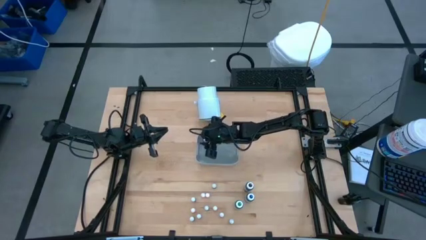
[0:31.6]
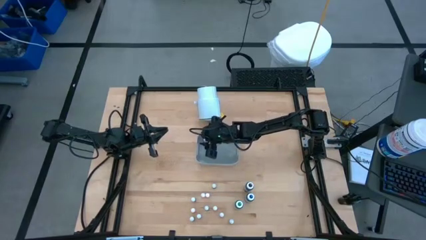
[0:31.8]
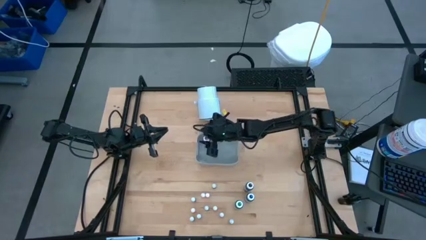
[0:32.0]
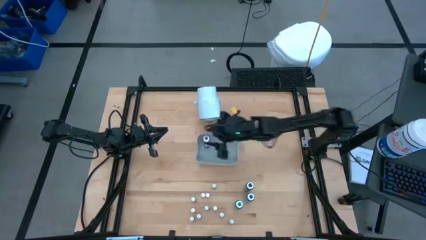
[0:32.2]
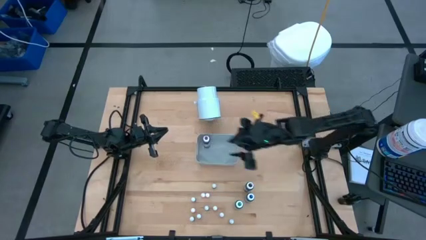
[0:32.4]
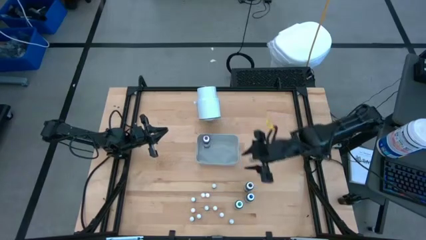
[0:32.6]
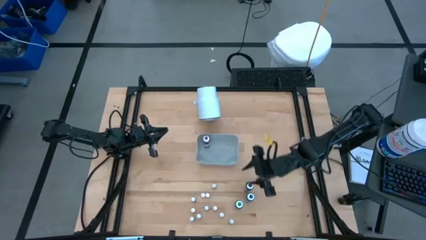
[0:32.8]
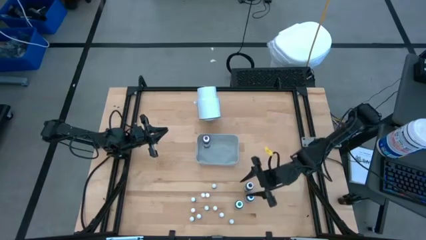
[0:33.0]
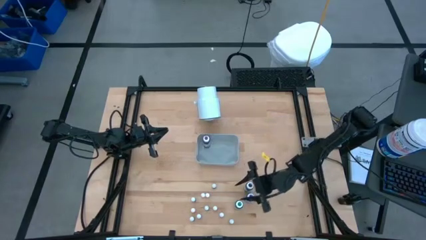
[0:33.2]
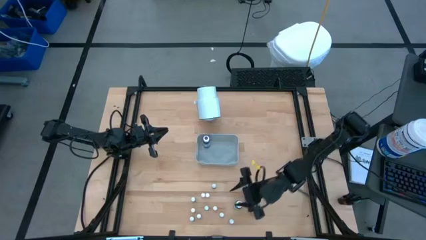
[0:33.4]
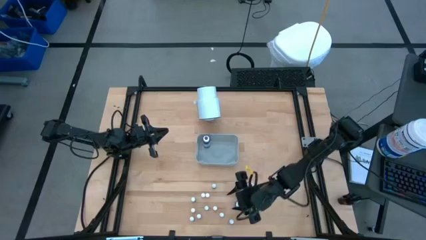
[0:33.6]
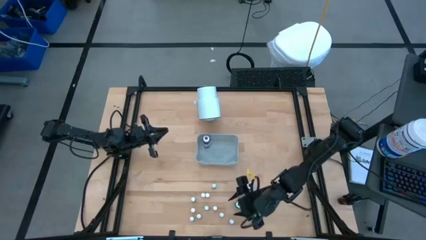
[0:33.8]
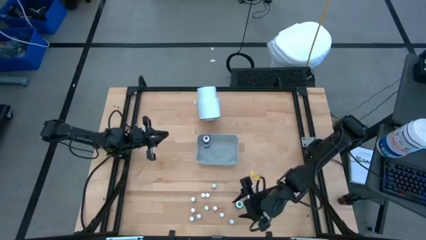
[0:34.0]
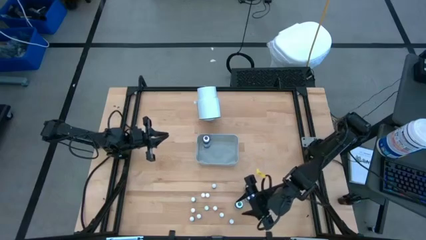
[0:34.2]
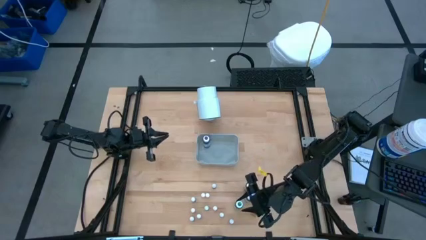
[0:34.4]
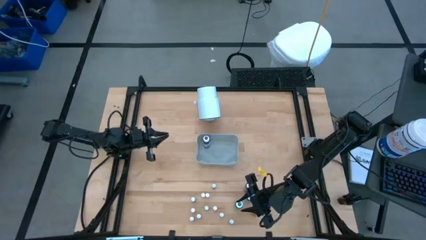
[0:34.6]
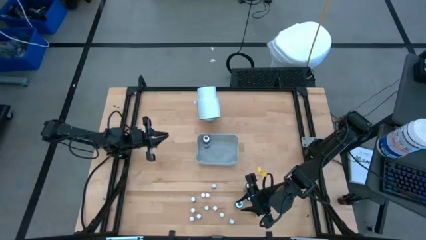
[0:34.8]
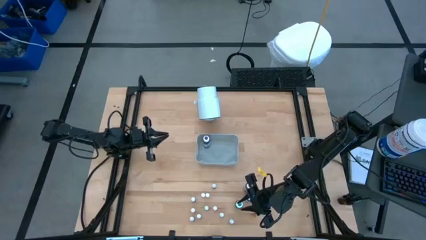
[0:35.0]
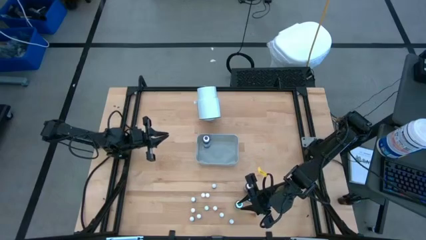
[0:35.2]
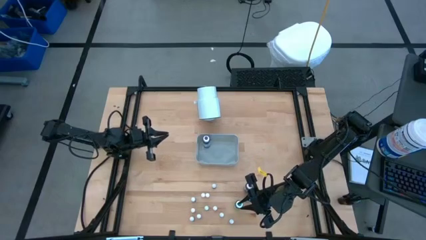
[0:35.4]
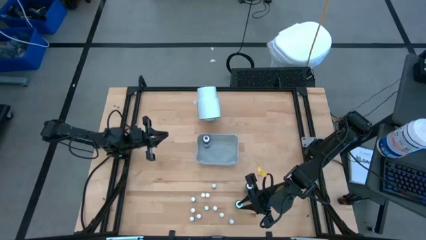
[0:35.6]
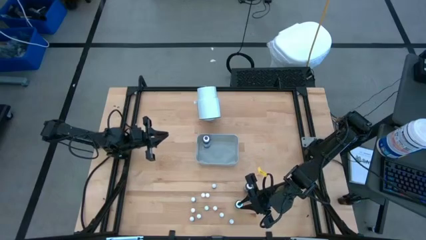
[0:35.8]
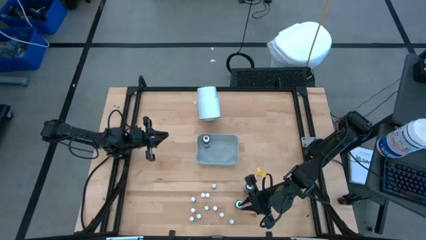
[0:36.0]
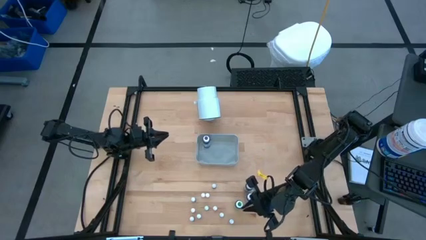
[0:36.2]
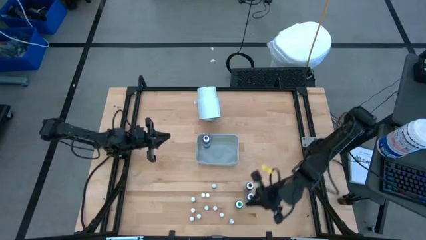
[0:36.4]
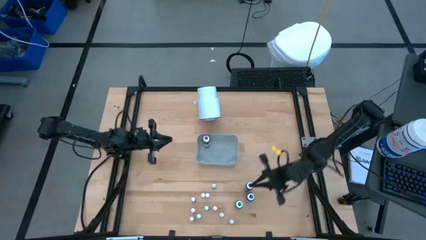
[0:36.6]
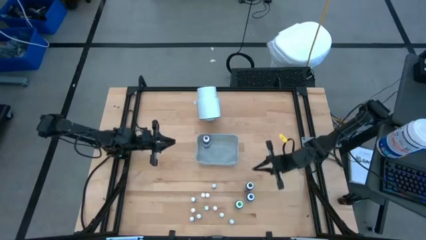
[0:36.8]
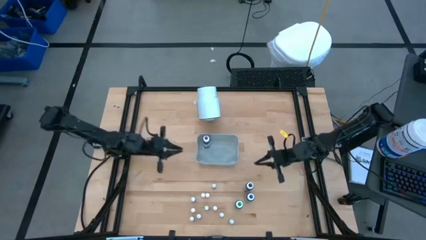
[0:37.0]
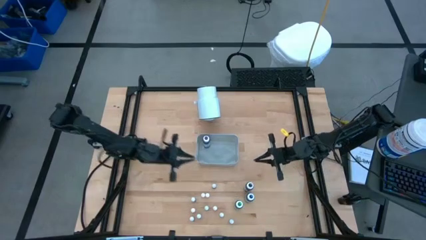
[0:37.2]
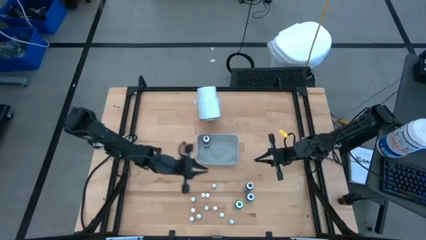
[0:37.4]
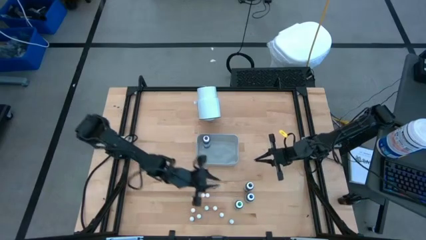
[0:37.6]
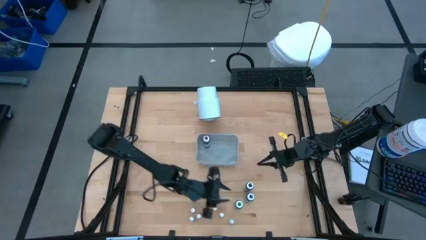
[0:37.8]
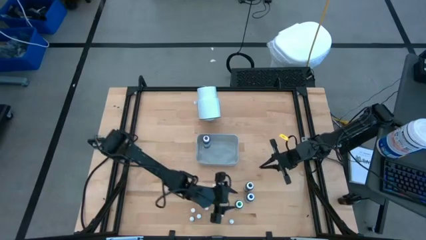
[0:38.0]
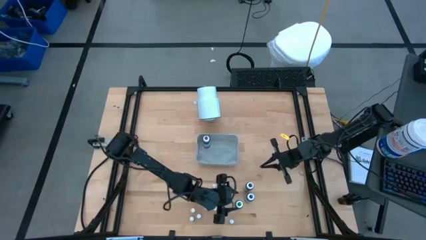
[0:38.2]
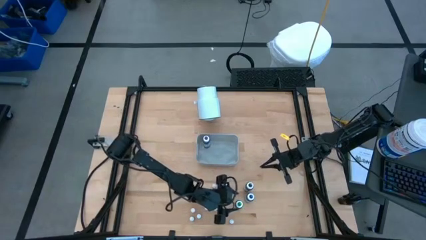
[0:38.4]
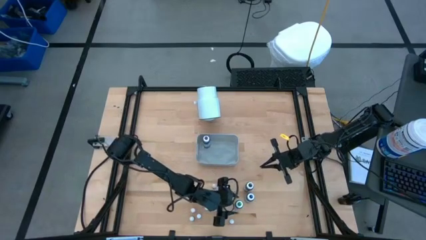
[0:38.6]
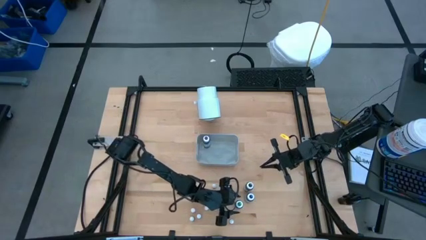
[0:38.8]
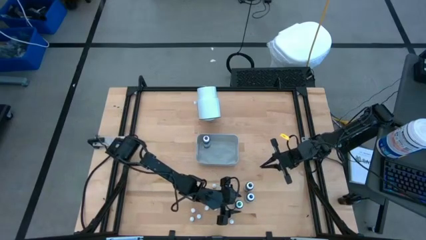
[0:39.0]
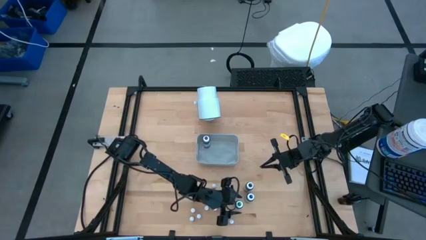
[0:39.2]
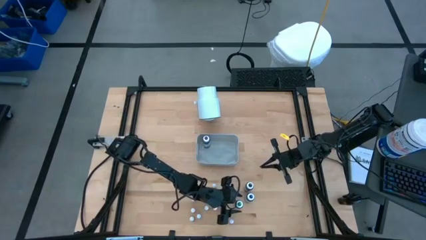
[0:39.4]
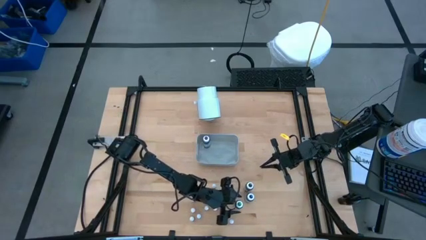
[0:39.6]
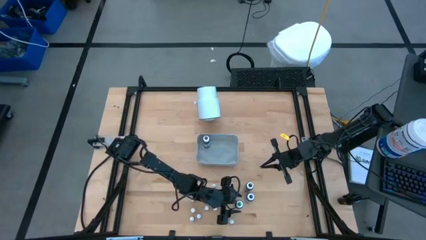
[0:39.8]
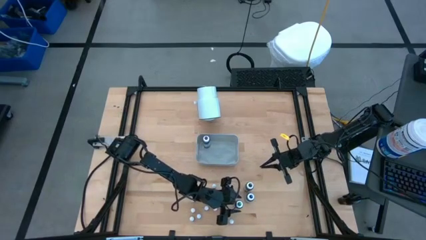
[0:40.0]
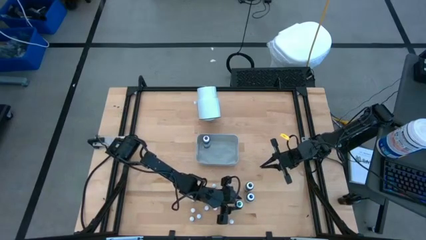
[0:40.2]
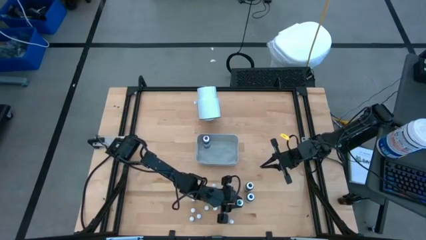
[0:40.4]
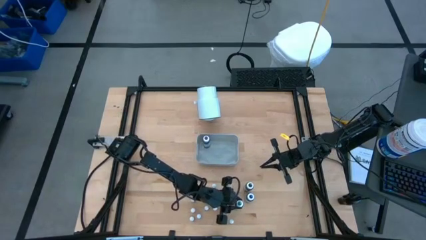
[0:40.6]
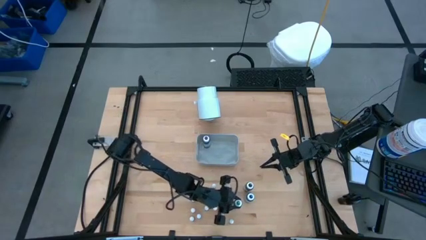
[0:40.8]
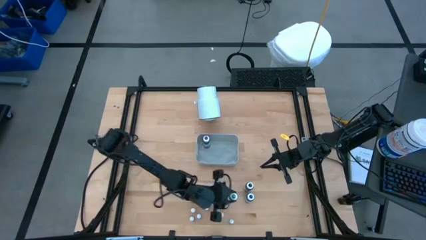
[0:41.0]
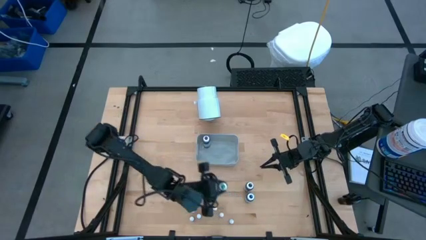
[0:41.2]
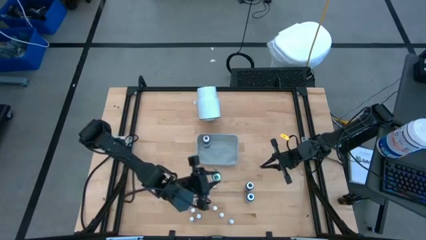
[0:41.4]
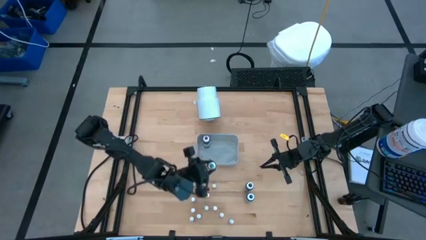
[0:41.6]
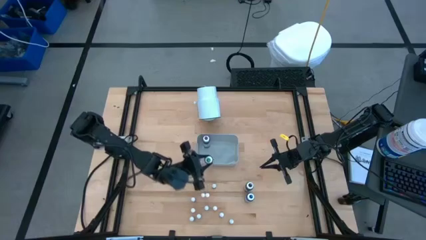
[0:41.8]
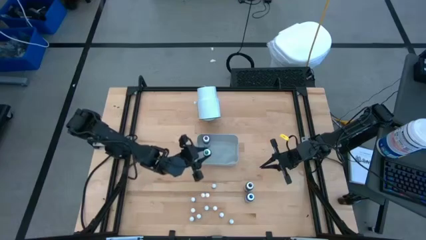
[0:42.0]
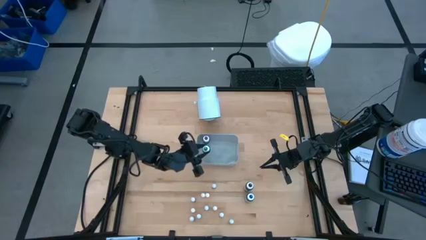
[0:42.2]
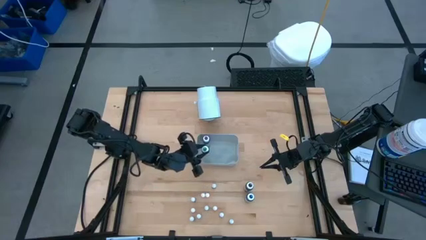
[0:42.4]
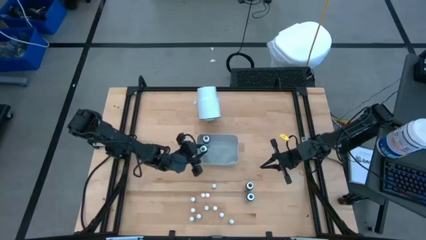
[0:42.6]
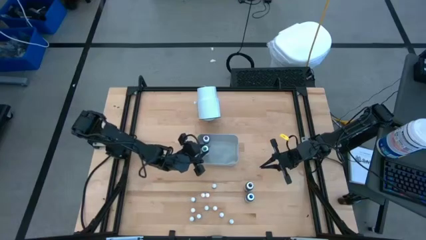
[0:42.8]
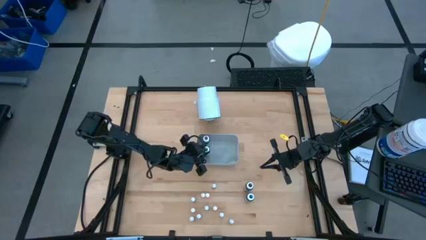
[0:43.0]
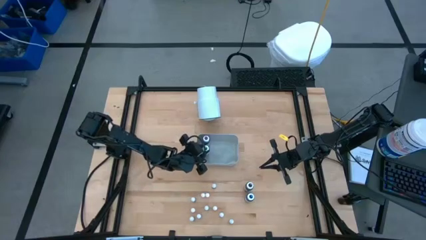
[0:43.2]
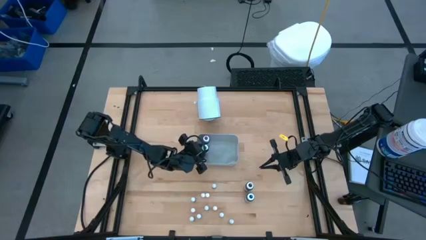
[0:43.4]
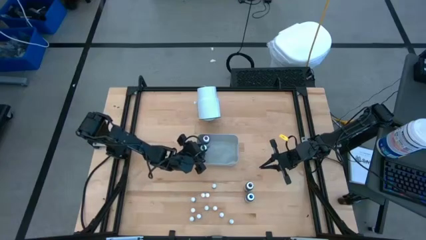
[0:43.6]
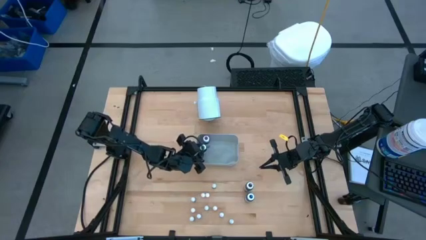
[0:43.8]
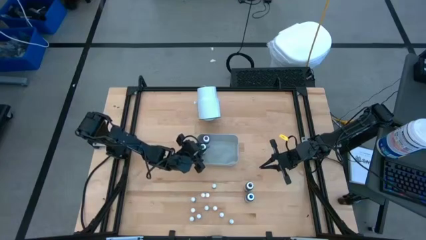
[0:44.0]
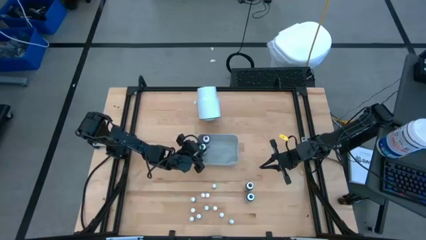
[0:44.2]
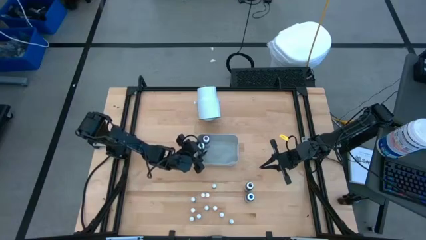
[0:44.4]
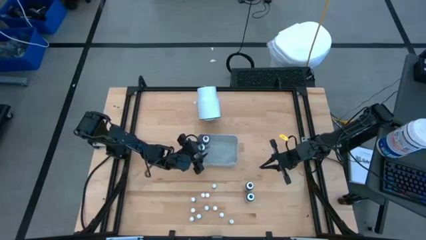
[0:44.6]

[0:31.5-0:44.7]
Task: Pick & Place food coloring
Put the green food coloring bottle into the gray bin

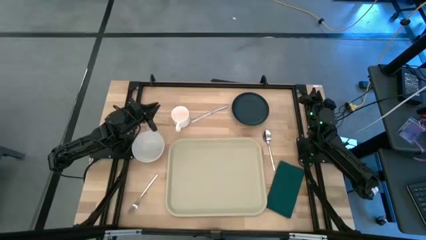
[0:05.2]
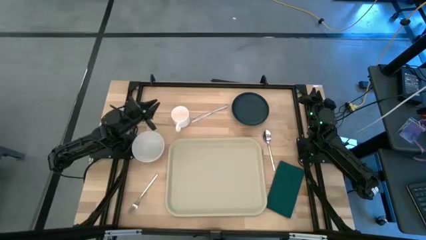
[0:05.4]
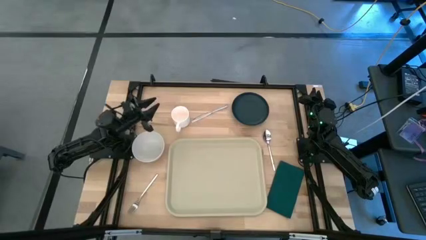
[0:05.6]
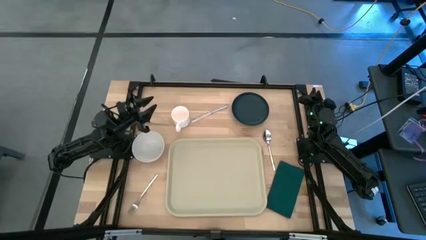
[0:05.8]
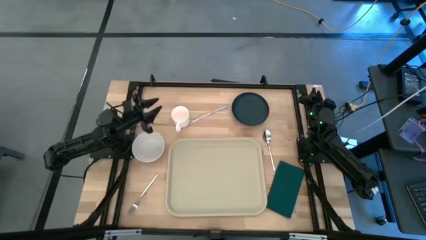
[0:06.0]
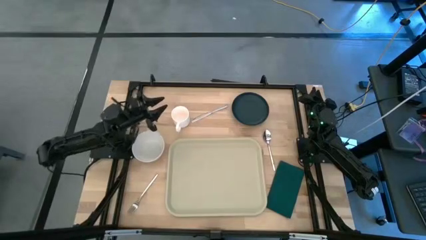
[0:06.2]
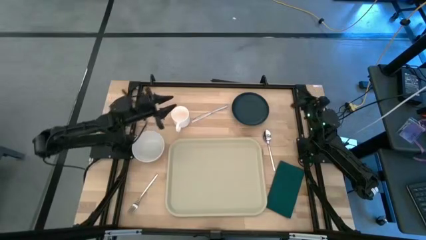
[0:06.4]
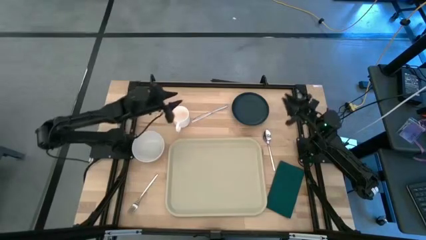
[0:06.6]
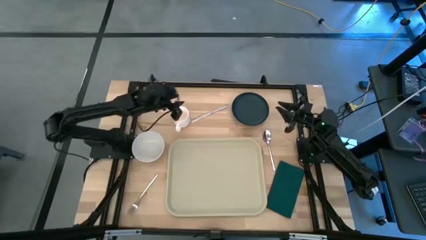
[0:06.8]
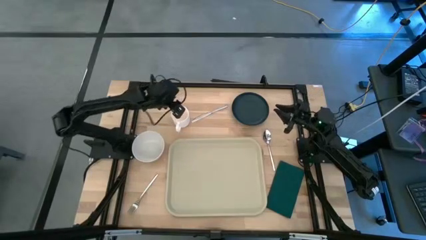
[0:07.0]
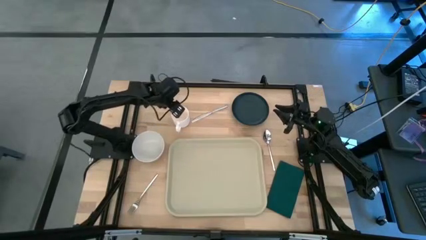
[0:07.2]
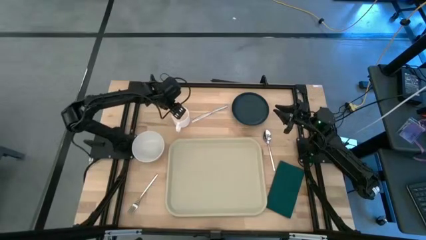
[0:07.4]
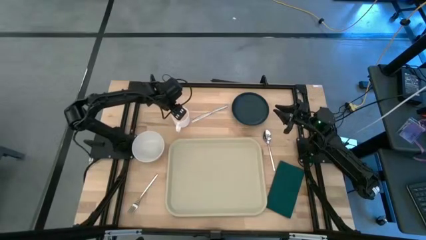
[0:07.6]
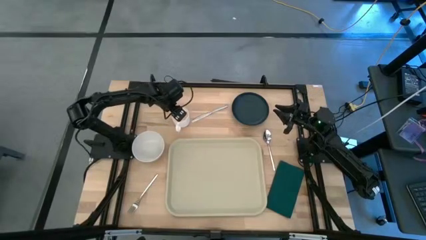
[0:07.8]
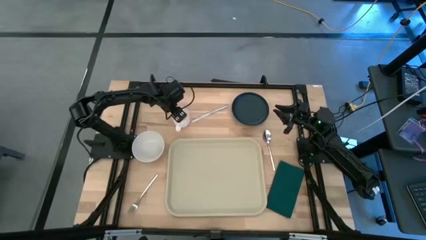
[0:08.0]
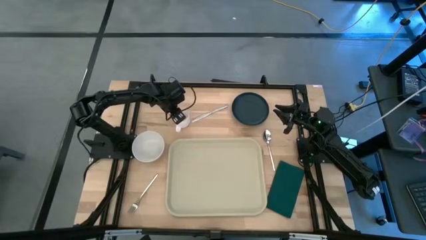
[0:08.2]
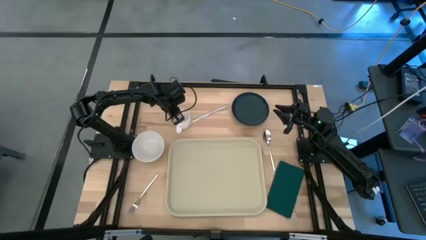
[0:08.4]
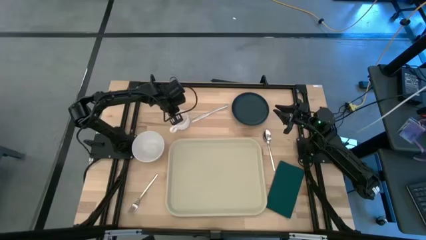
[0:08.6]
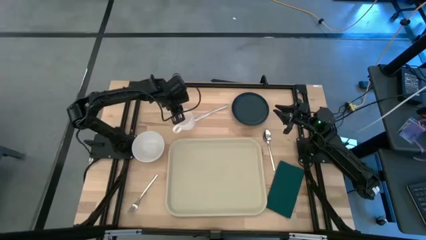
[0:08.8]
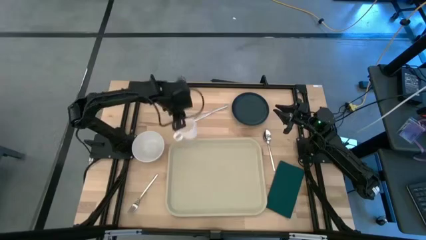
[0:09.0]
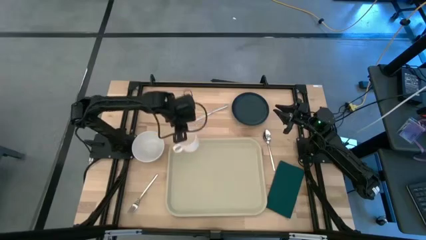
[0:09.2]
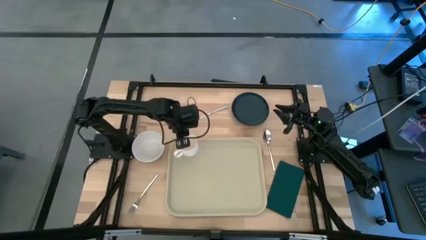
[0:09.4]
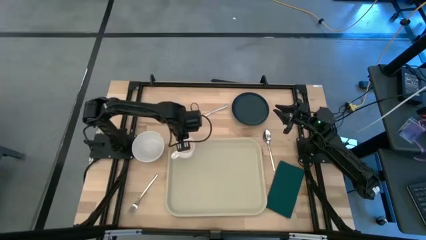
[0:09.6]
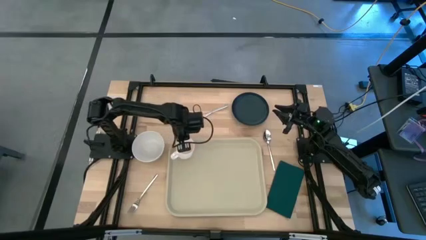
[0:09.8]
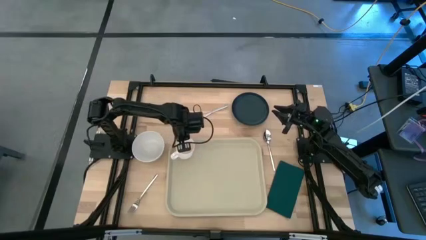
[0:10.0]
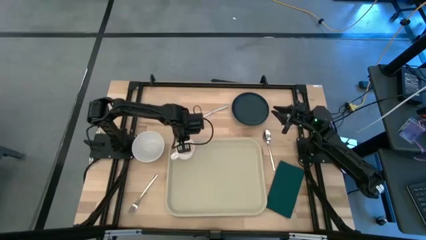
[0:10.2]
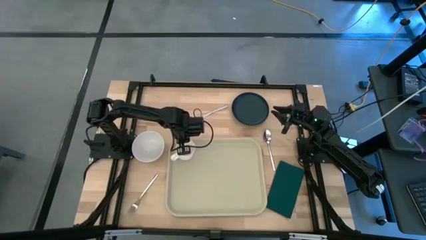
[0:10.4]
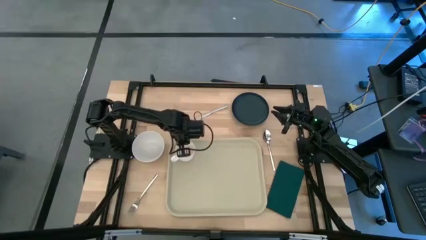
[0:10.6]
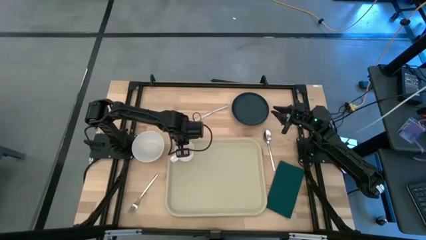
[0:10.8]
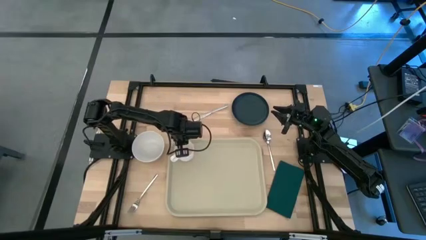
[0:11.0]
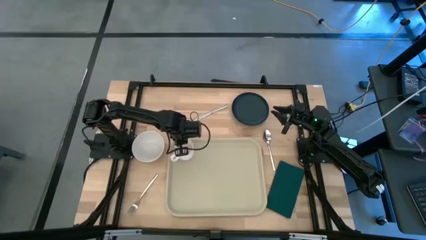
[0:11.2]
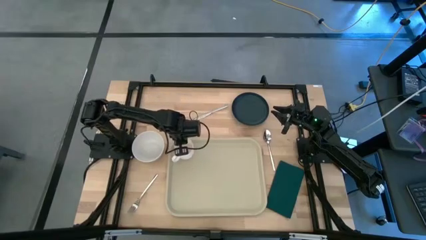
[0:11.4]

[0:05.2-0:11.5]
Task: Set up tray
Put the white mug on the brown serving tray
